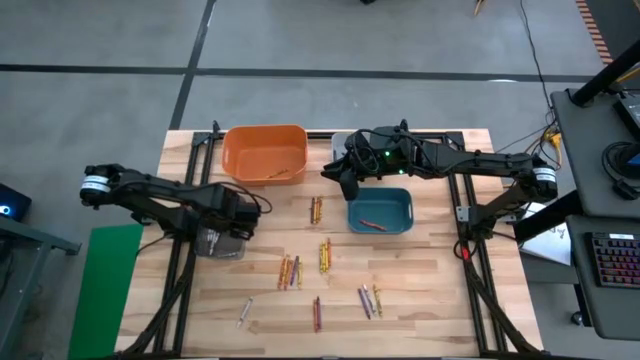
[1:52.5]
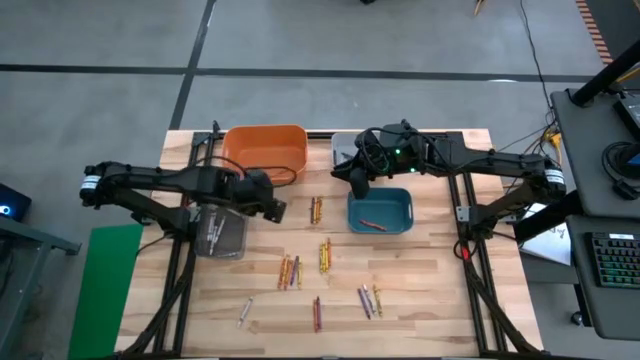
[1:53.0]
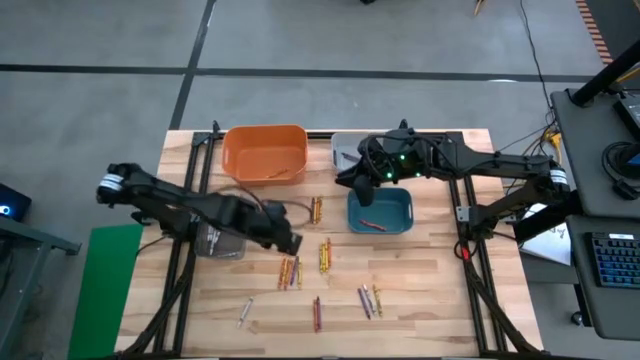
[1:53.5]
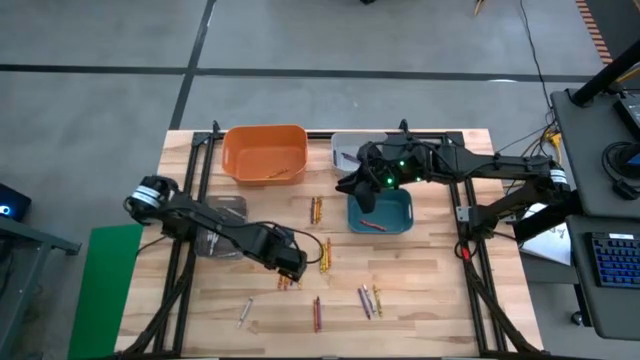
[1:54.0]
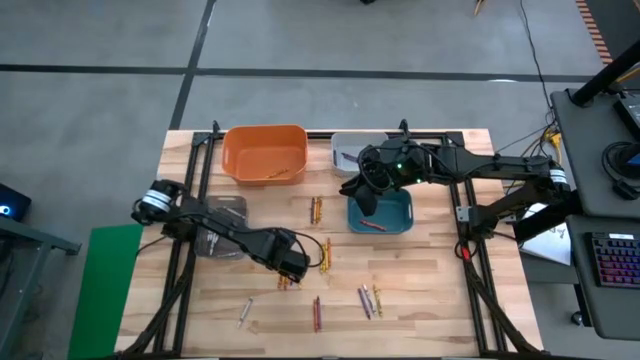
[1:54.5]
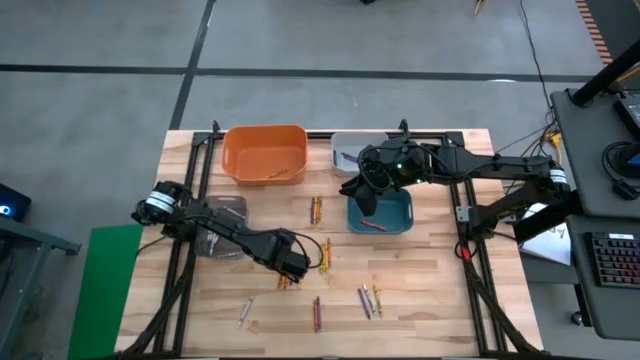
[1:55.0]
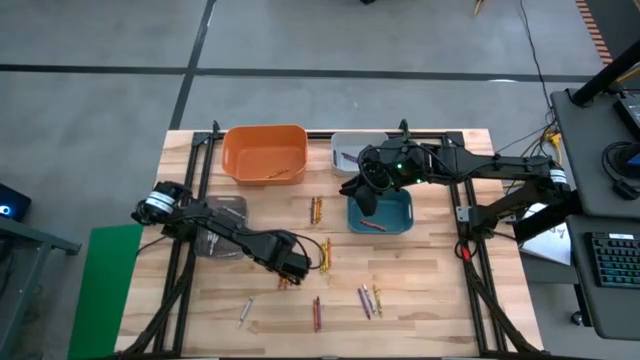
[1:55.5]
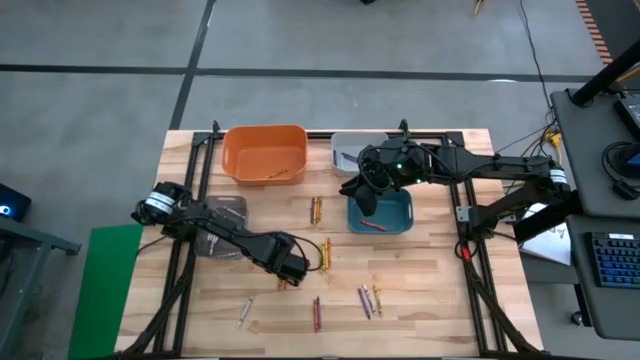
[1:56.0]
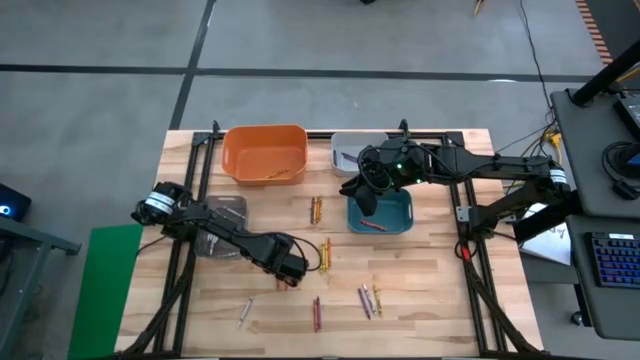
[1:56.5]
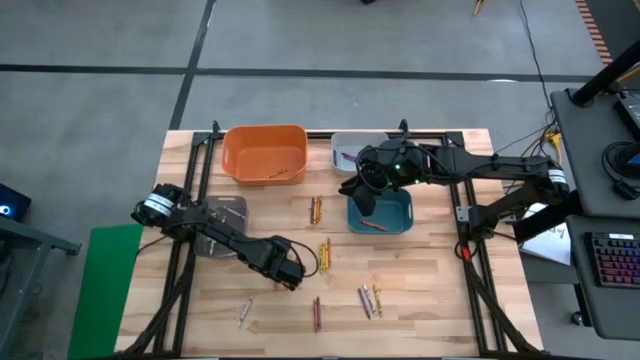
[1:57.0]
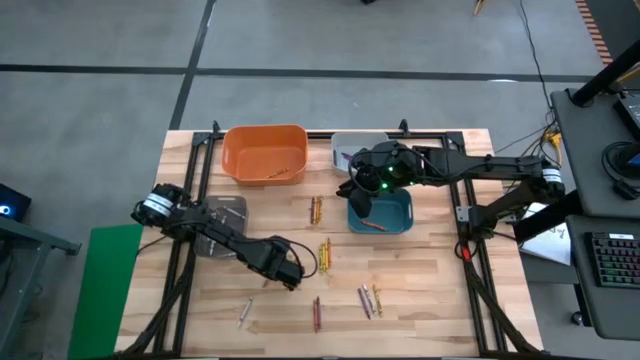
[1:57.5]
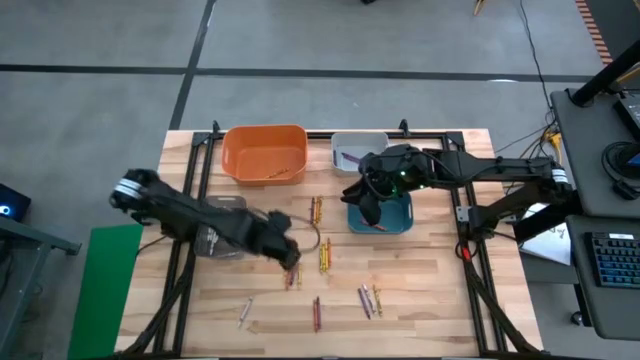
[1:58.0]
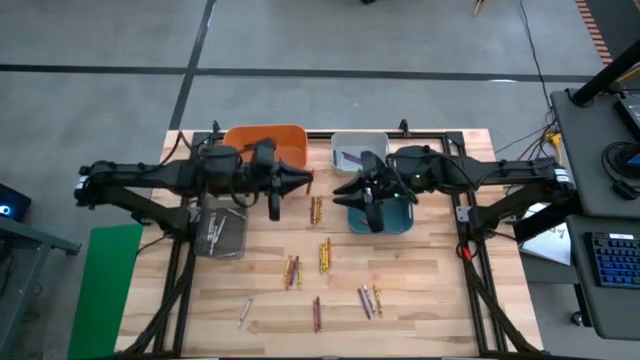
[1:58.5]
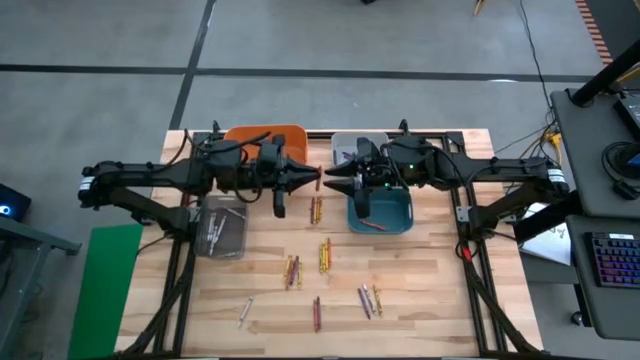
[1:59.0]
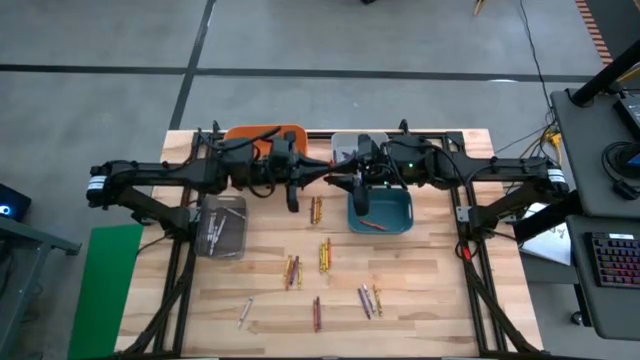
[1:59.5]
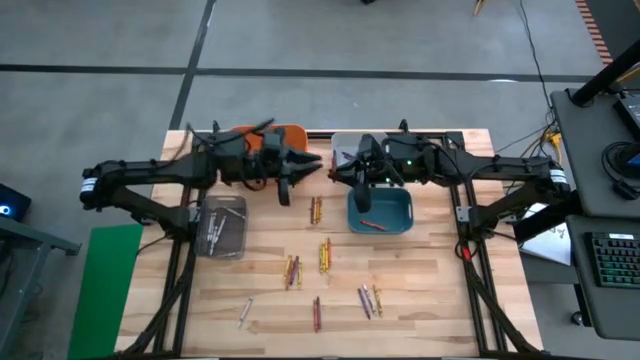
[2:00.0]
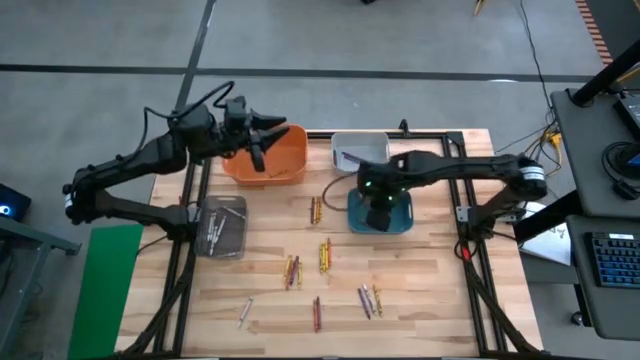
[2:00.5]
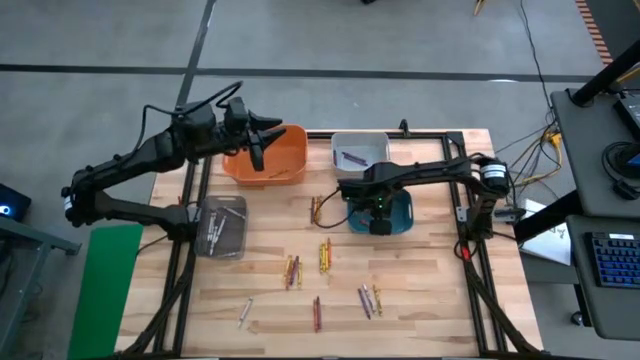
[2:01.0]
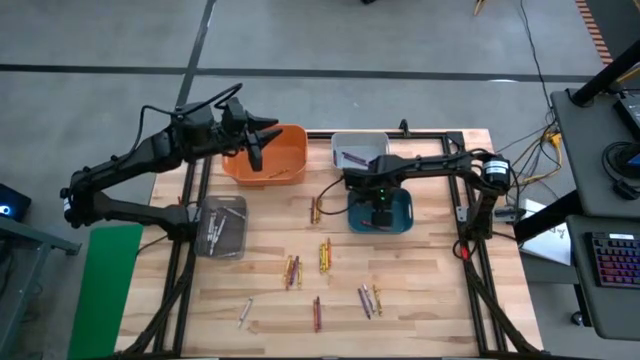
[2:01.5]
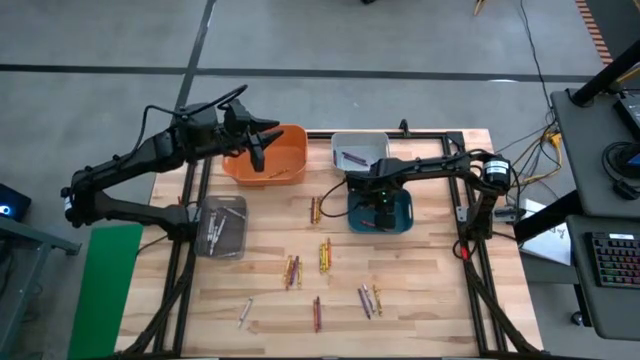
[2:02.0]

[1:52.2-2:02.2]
Task: Sort crayons
Put the orange crayon into the blue bin

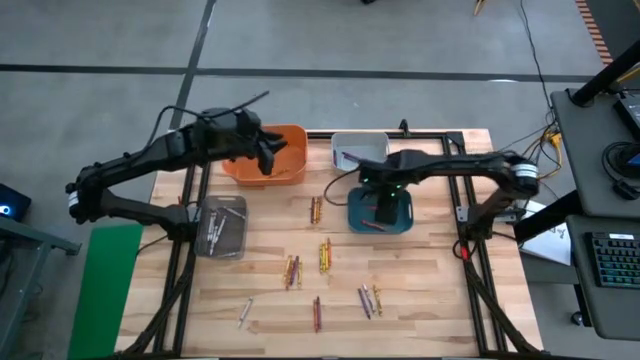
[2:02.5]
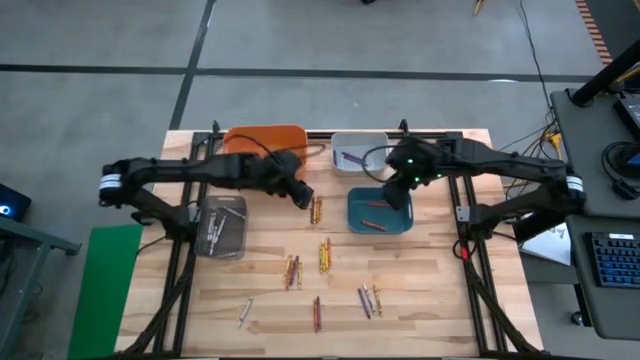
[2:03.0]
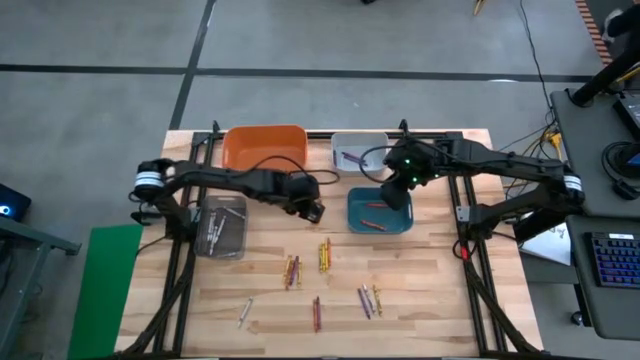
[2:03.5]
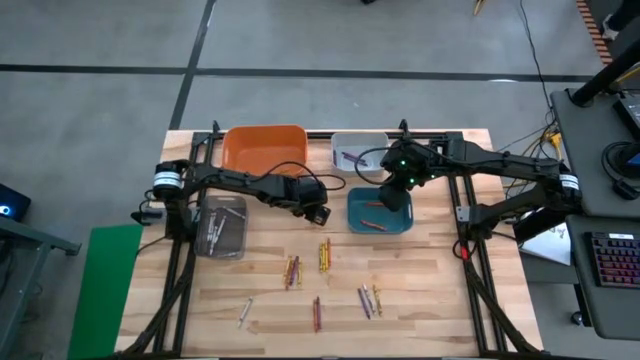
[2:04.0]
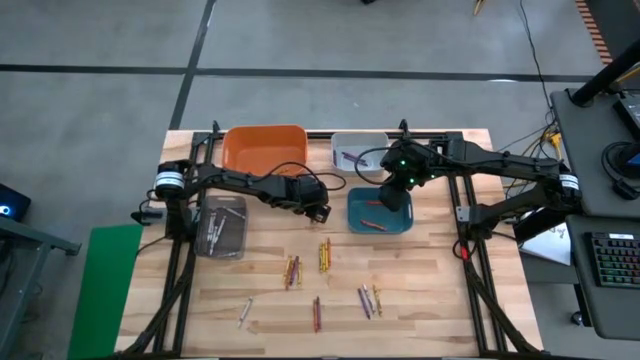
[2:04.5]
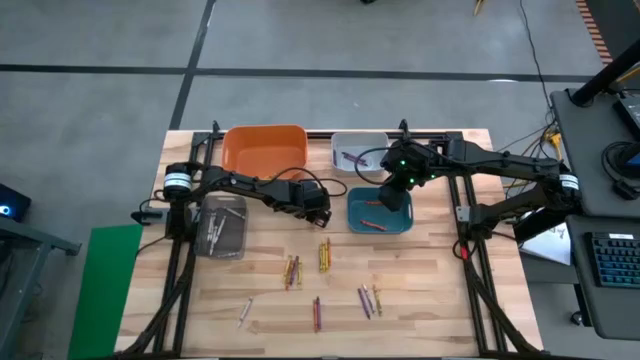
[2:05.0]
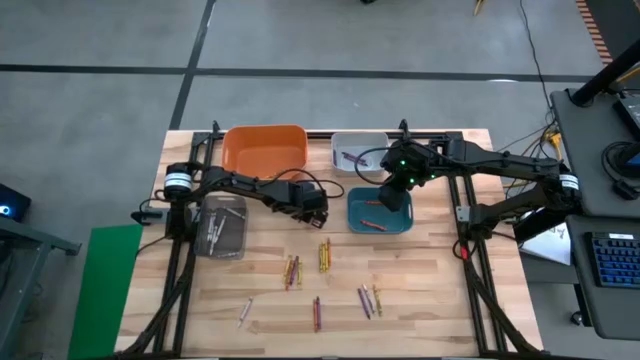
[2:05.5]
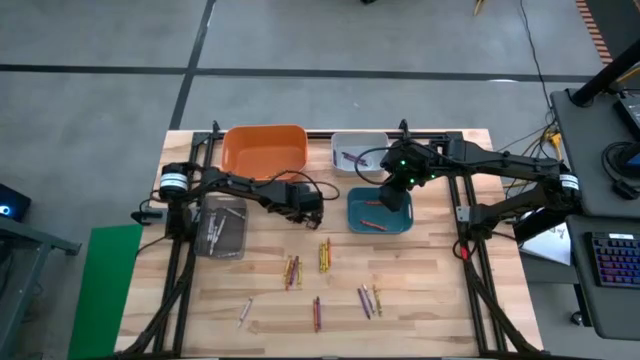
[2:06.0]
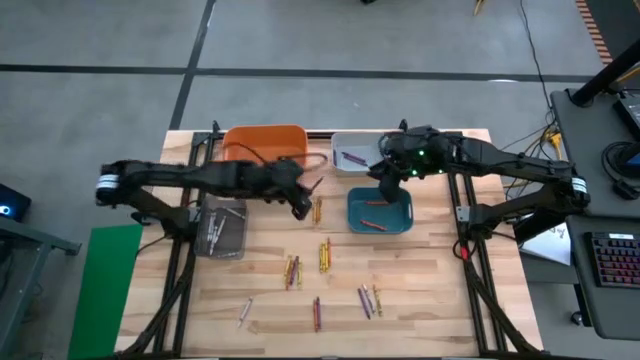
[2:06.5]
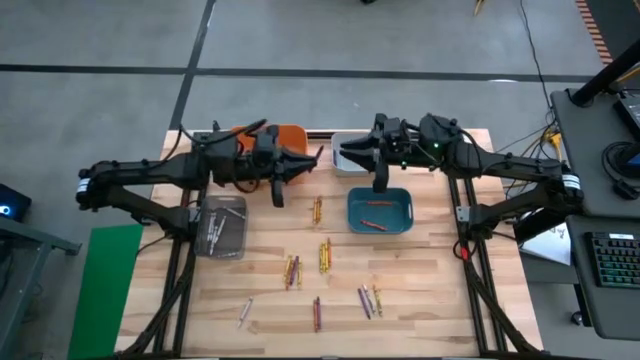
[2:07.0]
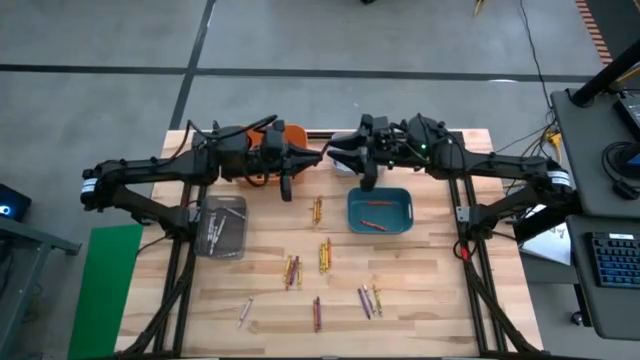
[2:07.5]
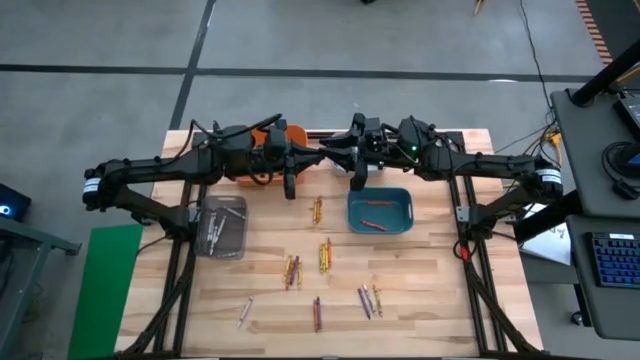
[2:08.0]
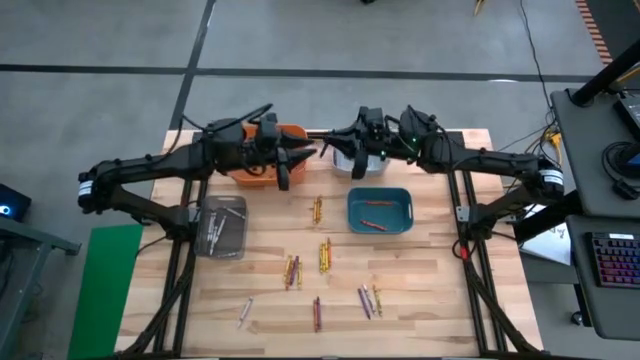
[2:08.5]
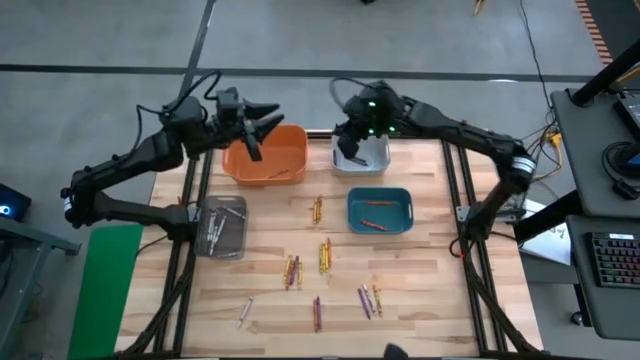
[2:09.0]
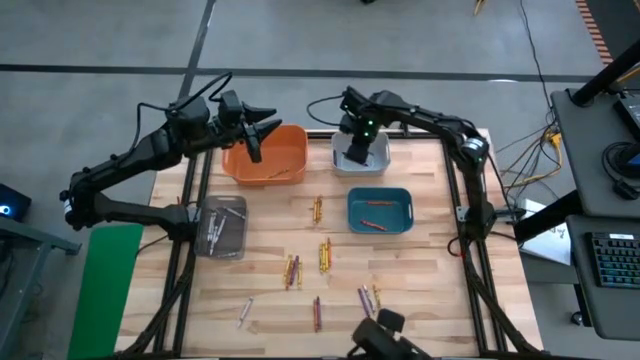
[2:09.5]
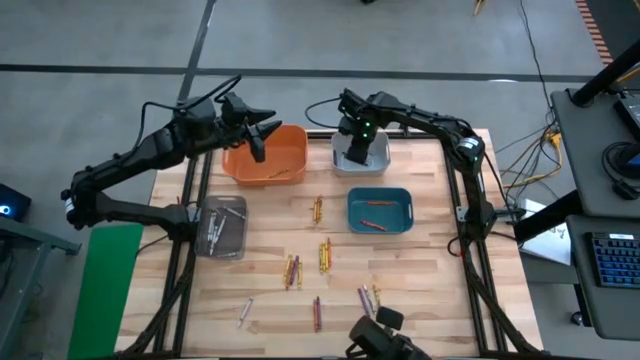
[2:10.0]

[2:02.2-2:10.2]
Put the violet crayon into the gray bin

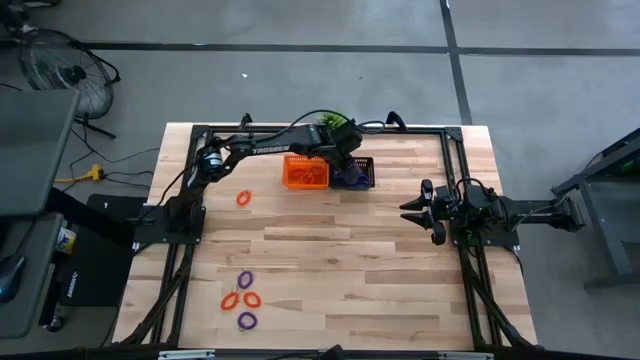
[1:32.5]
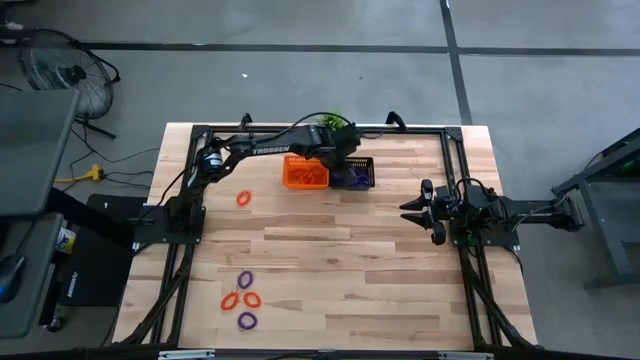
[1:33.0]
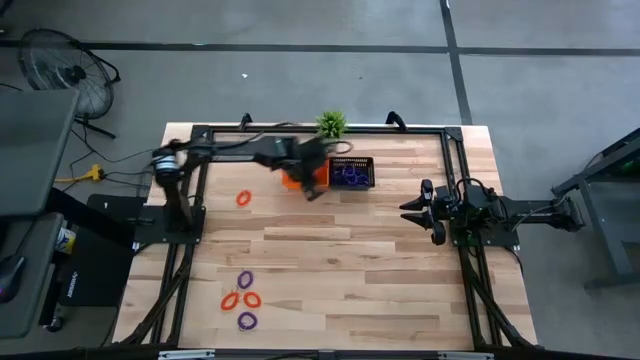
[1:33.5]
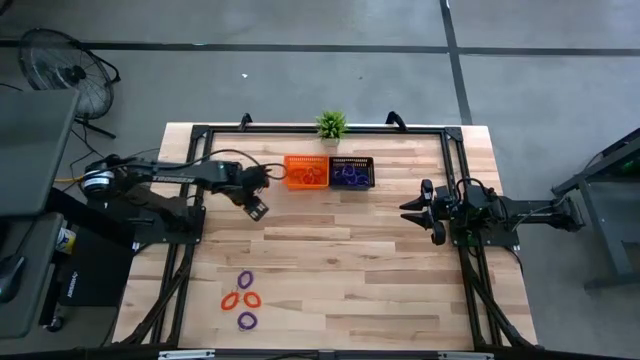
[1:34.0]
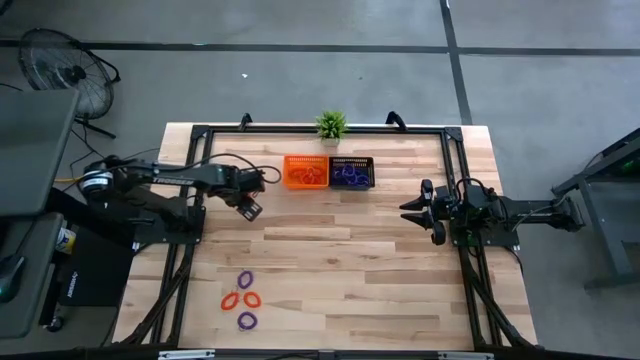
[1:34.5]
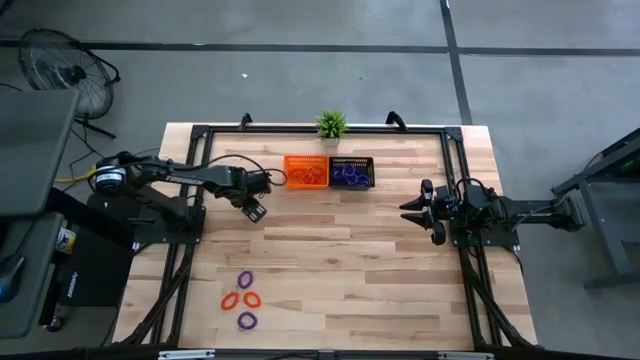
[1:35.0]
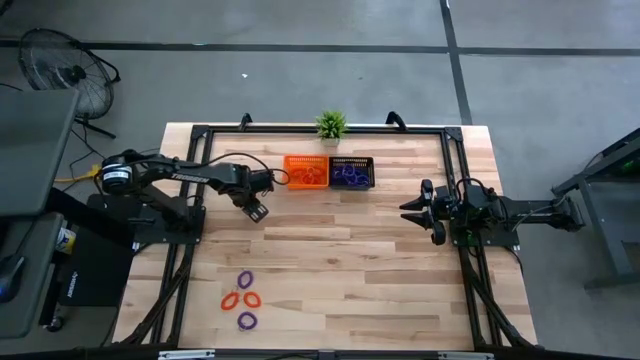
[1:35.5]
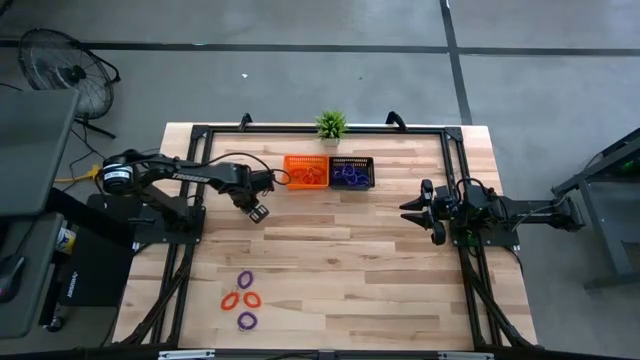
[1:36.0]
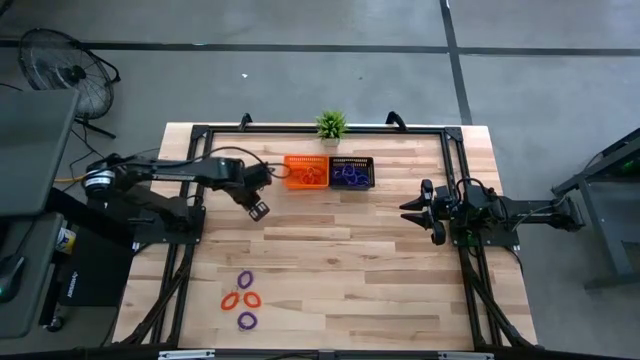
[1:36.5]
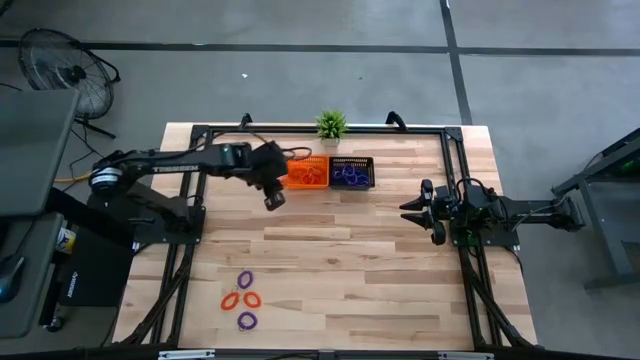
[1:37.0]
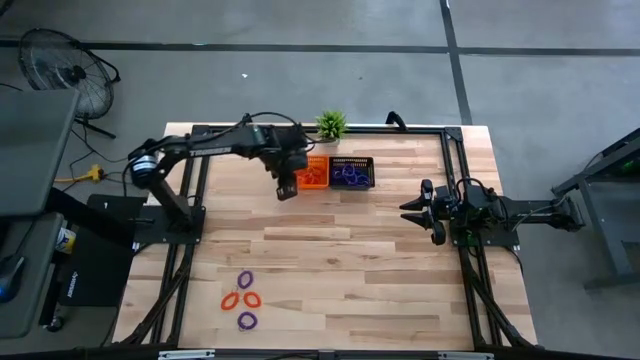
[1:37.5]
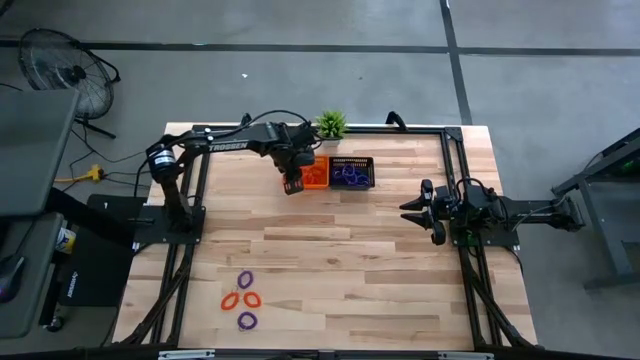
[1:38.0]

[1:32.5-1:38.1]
Task: Sort spring keychains into baskets
Put the orange spring keychain into the orange basket
